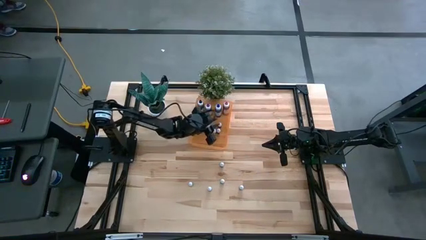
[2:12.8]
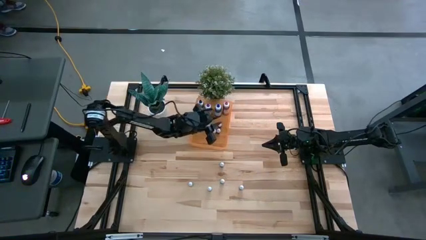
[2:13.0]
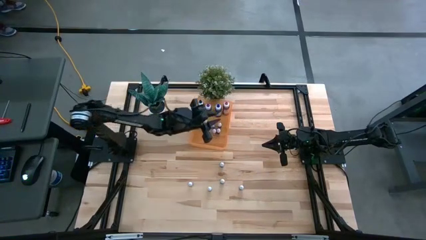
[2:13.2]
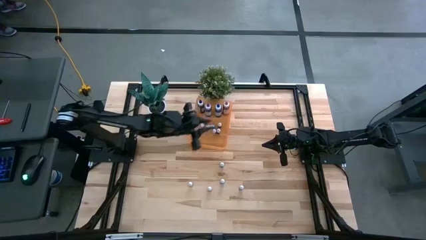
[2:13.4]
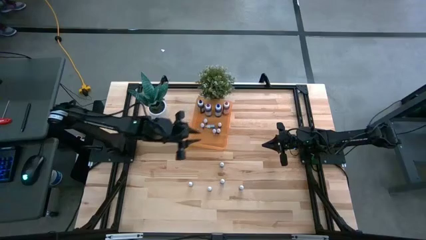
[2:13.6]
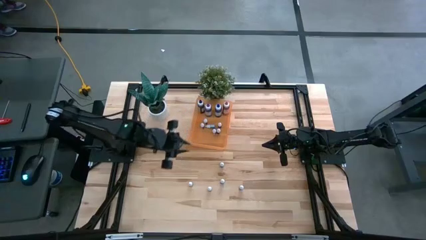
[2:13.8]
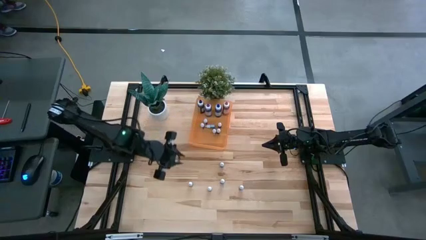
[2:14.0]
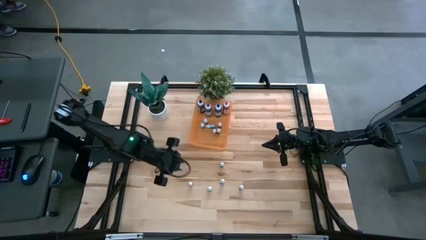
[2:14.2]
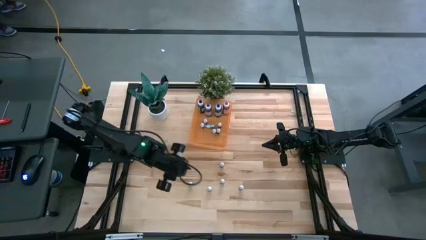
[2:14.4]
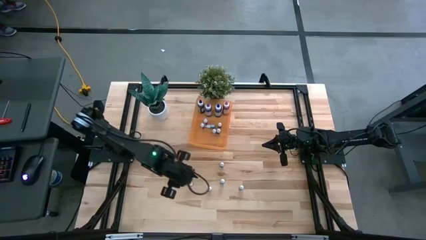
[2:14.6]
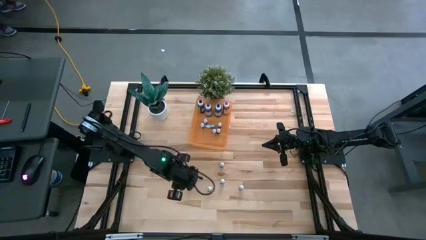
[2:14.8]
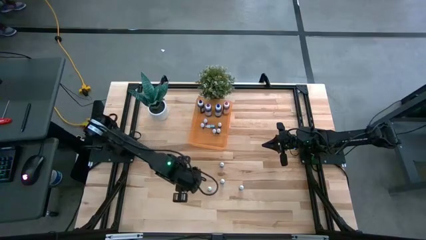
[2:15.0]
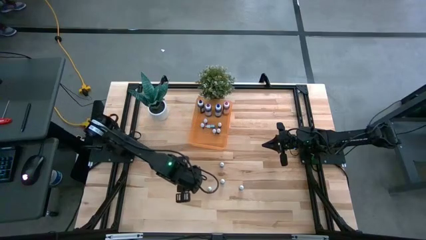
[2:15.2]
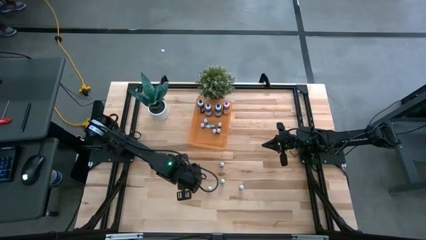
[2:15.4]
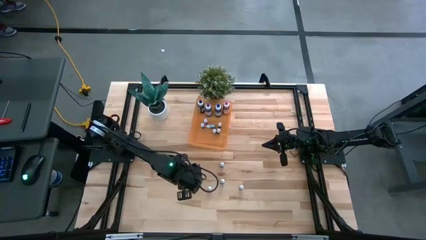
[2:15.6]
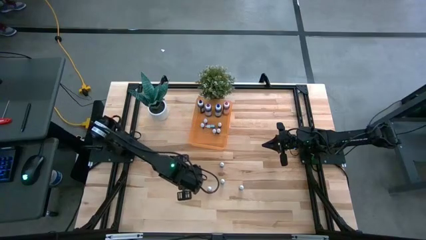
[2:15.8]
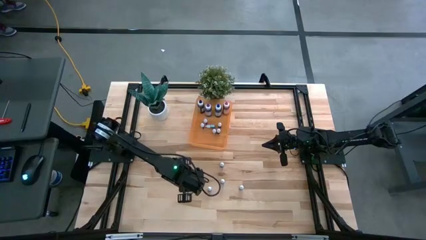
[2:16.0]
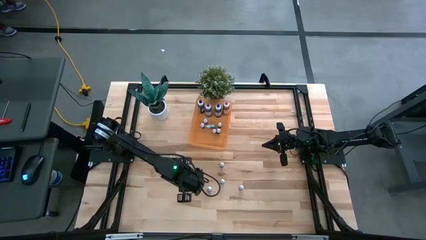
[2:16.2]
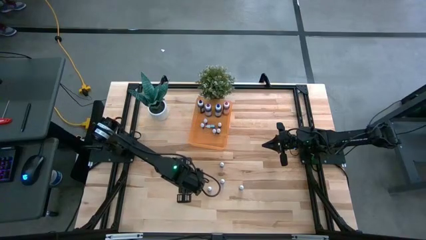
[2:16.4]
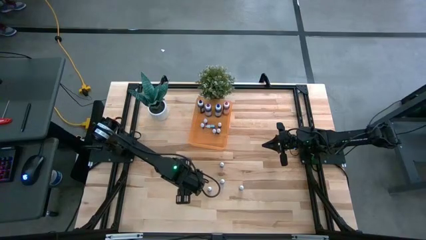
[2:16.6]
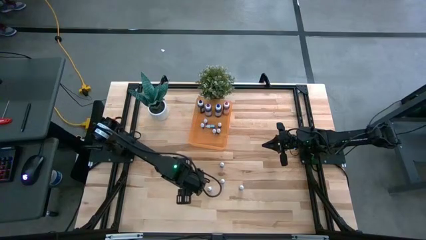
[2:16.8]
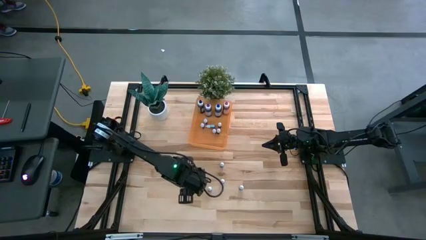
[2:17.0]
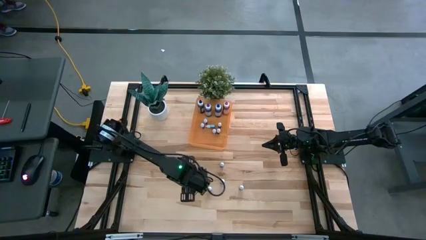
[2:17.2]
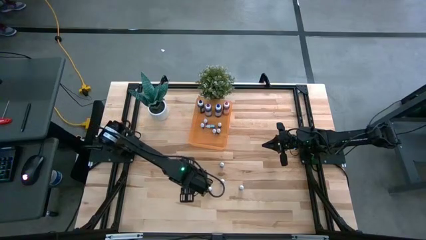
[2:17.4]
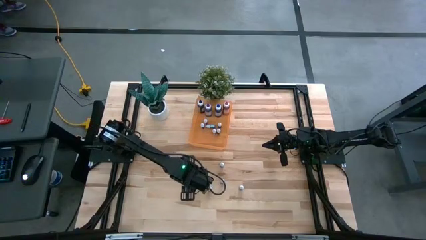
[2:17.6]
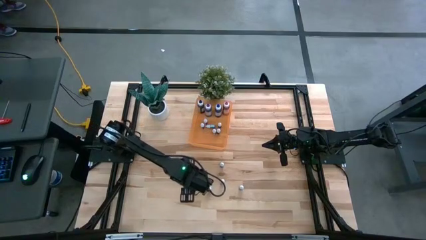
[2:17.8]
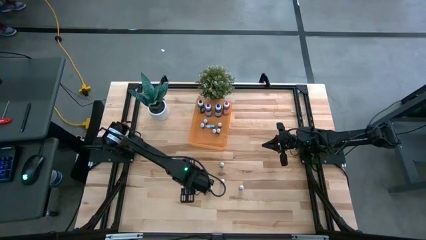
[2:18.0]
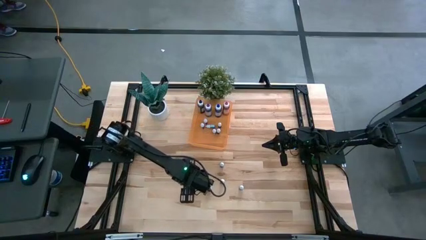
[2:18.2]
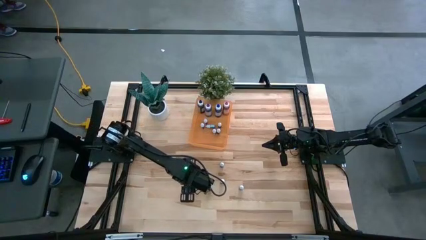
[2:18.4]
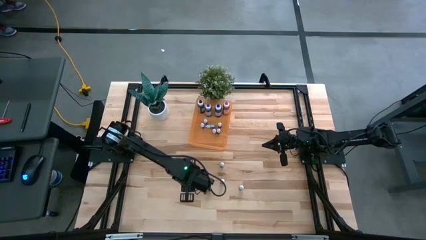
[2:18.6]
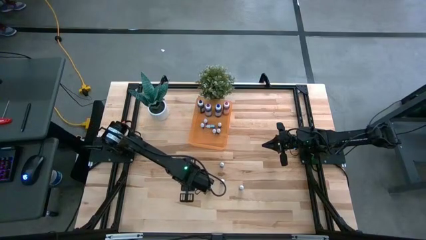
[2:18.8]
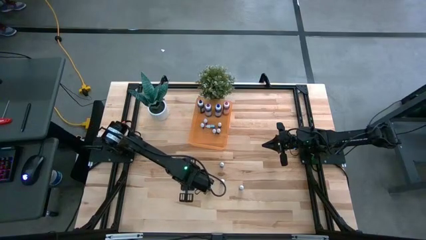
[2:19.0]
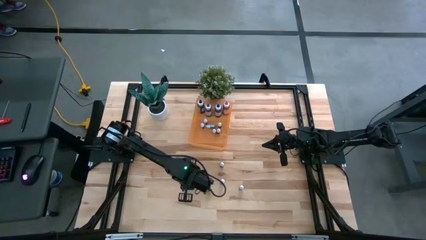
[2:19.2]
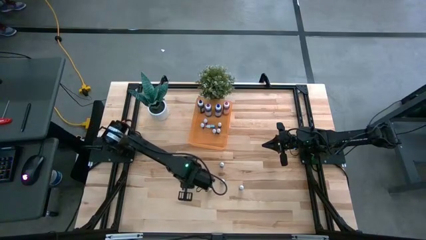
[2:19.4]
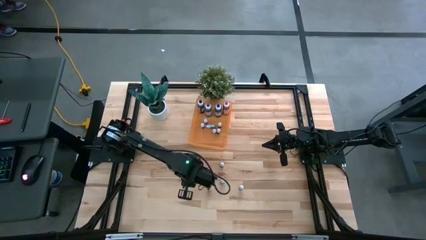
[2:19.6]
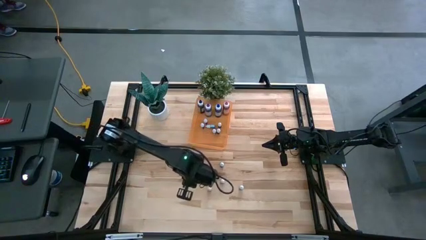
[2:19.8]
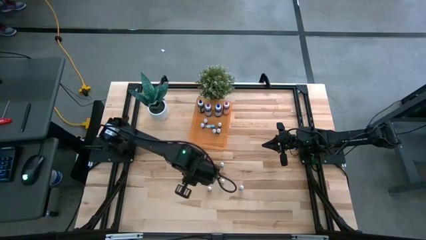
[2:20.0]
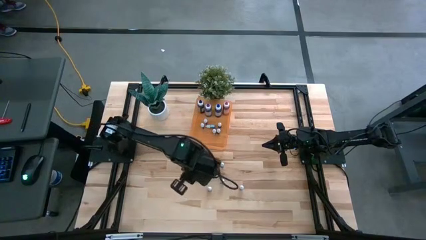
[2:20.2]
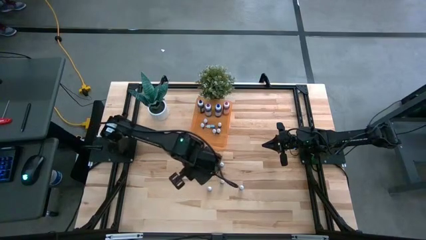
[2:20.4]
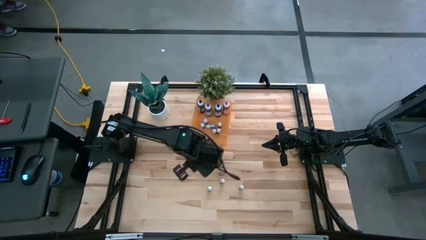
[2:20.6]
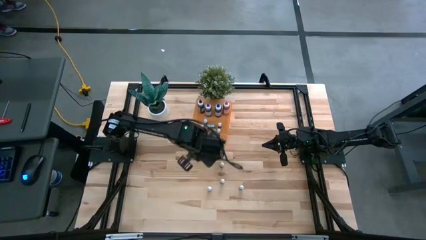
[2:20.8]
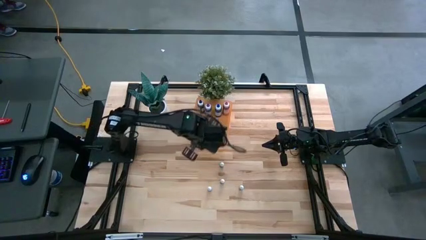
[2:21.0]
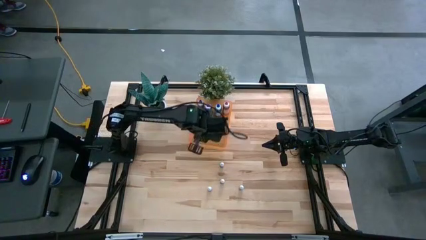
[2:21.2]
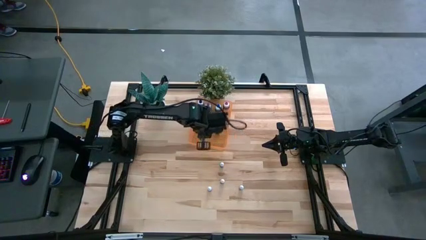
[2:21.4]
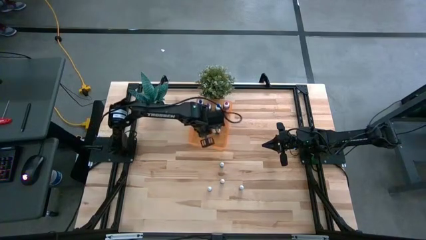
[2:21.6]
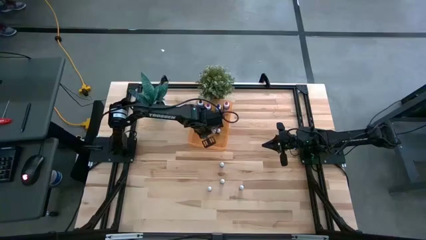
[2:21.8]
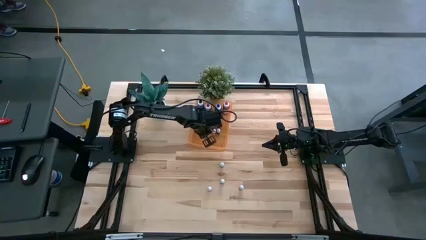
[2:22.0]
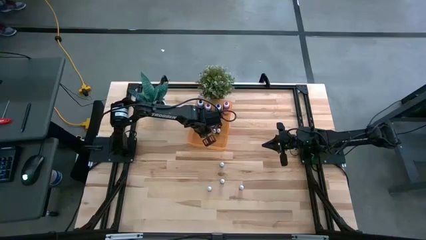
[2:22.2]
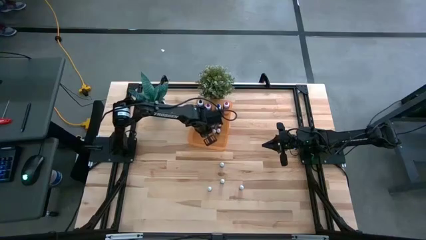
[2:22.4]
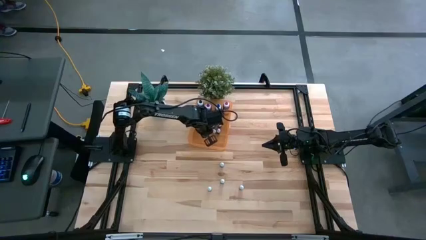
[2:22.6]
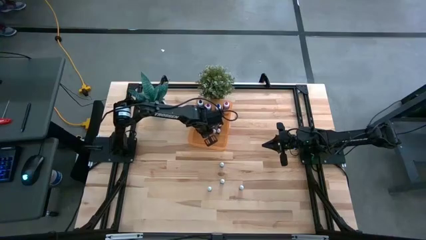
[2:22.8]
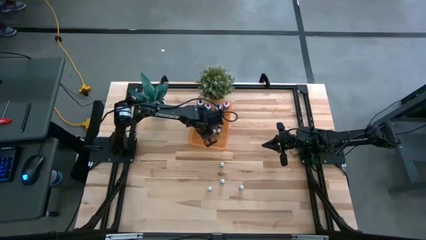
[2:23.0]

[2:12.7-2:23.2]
Task: Pick & Place food coloring
Put the small black food coloring bottle into the orange bin
